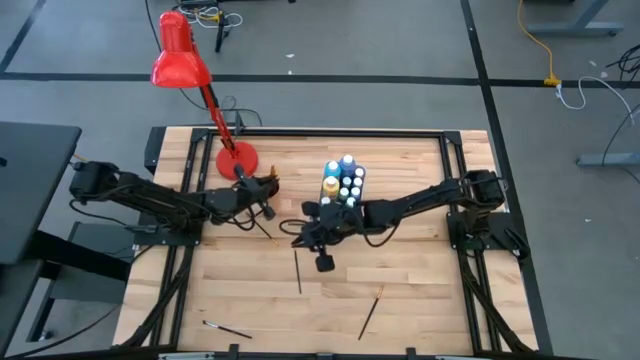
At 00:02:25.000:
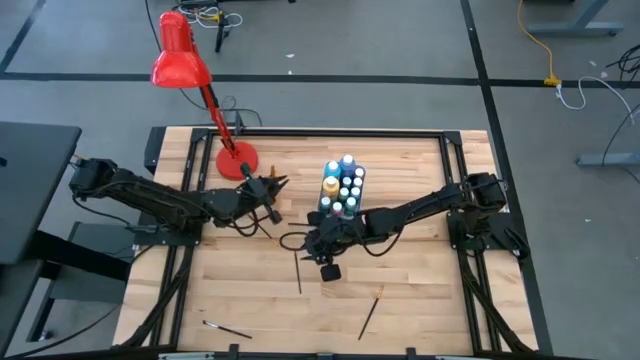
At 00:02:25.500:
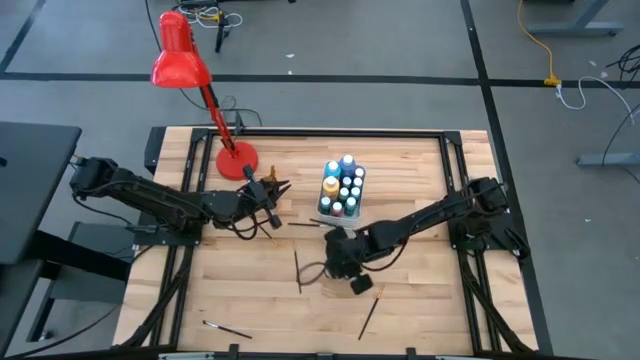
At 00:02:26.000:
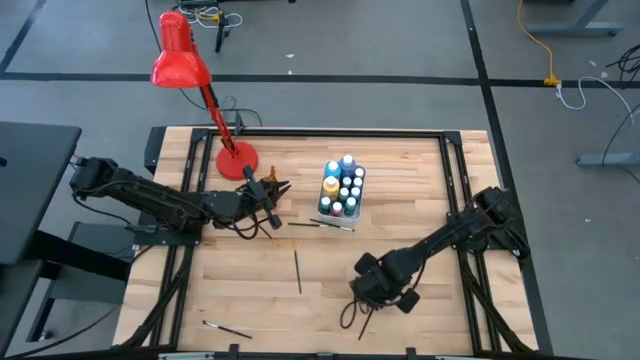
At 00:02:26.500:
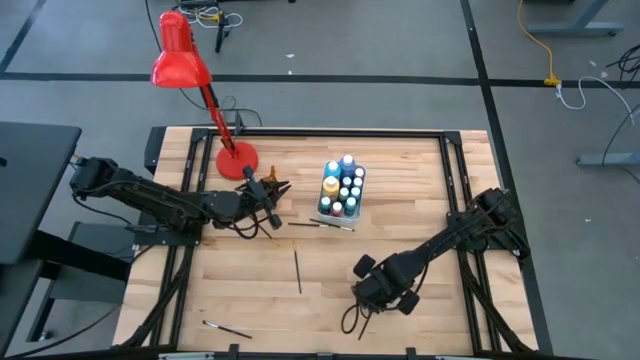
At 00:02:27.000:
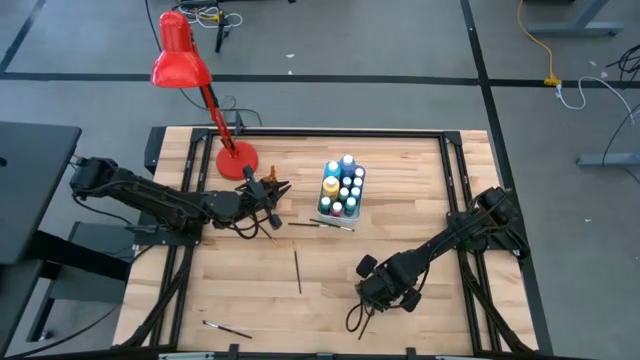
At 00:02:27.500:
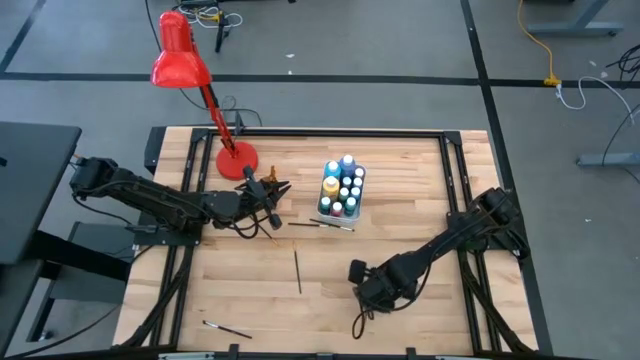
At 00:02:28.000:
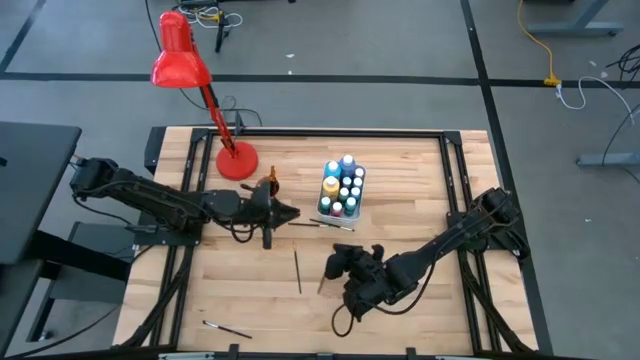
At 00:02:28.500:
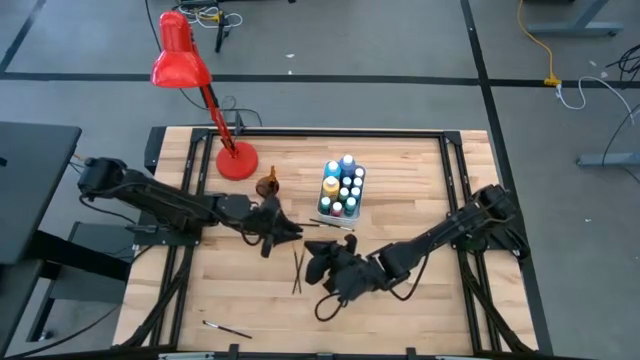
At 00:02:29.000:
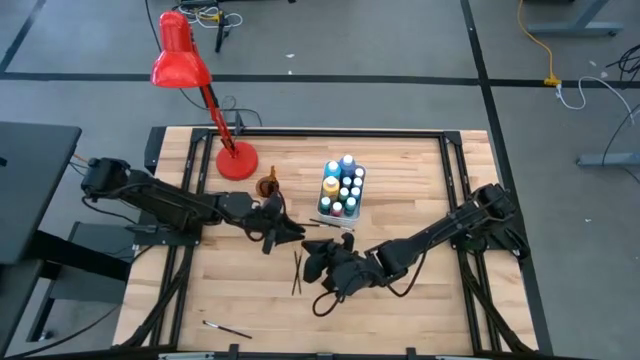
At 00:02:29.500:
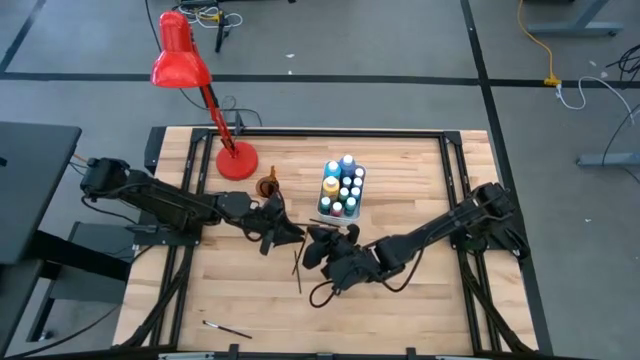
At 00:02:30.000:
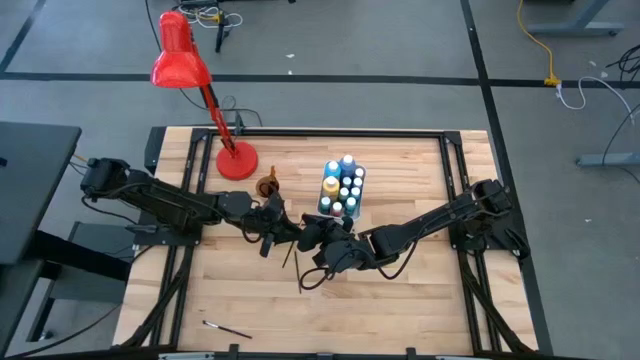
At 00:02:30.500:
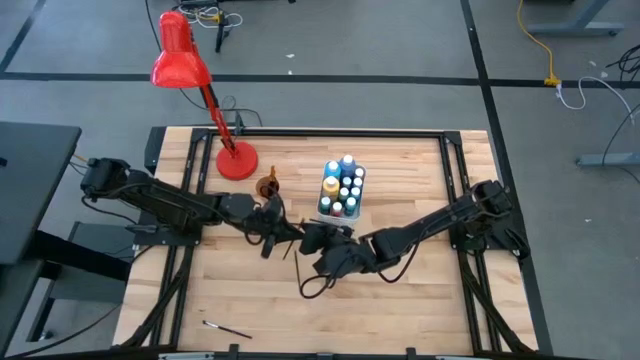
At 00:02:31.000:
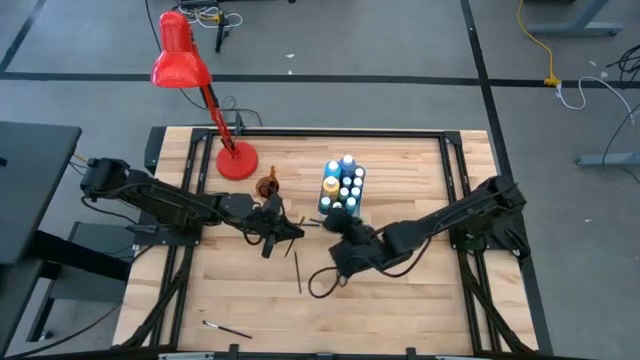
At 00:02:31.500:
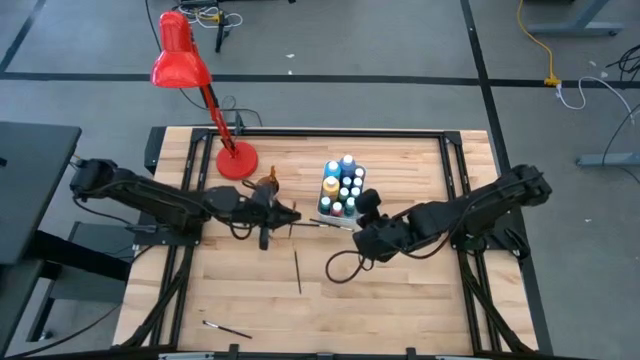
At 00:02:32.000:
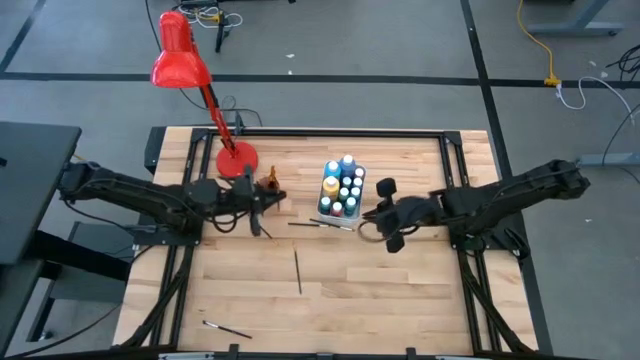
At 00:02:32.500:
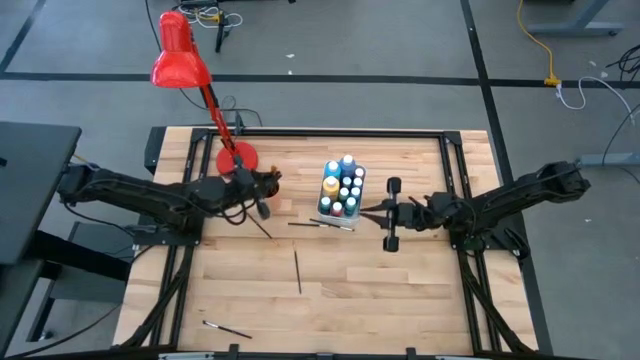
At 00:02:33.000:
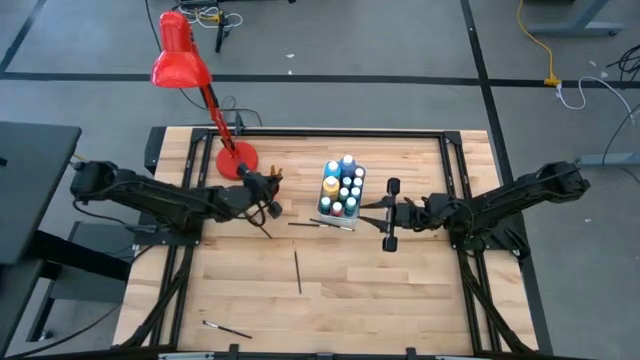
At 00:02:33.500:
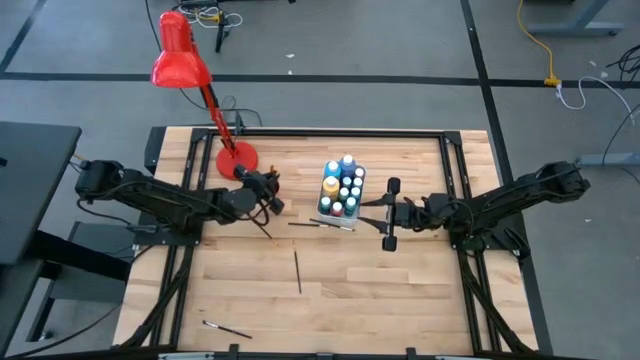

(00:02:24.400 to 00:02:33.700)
Task: Pick & Place Paint Supplies
Put the yellow paint brush into the orange cup

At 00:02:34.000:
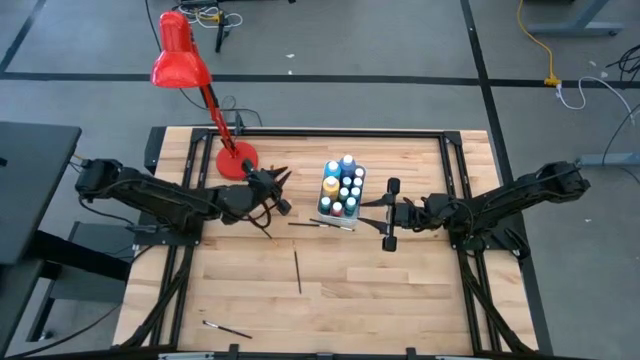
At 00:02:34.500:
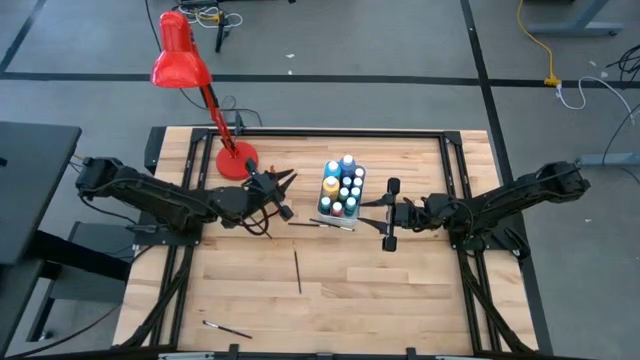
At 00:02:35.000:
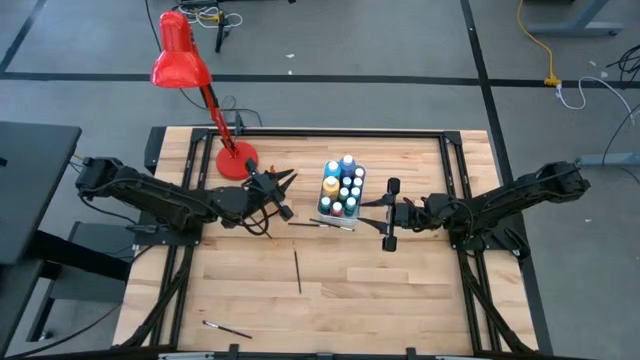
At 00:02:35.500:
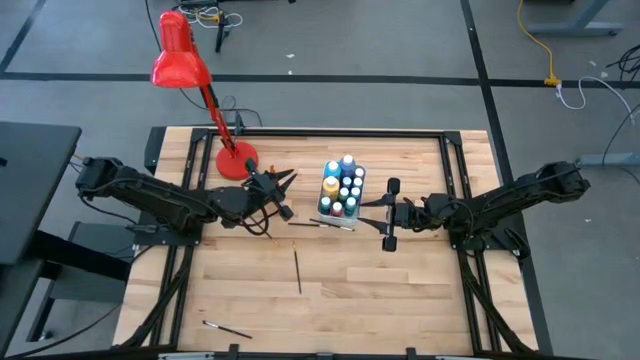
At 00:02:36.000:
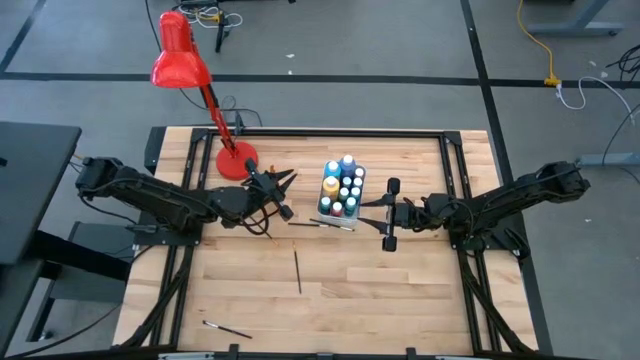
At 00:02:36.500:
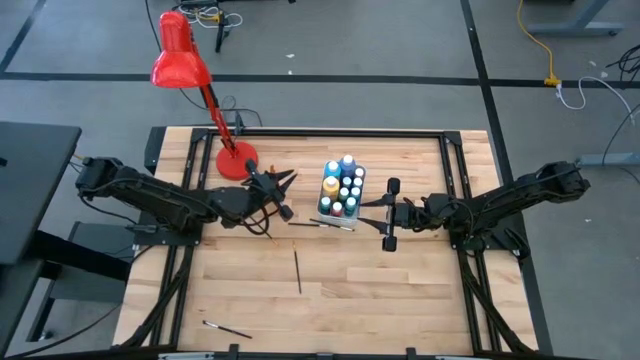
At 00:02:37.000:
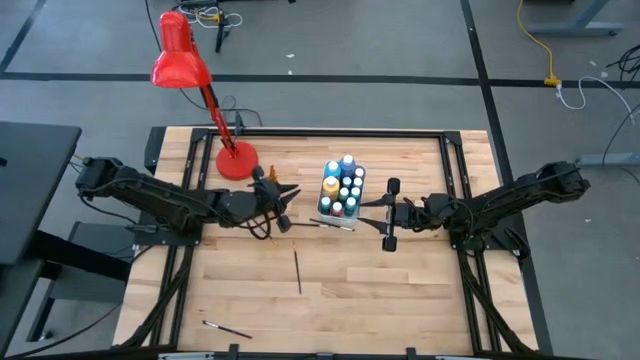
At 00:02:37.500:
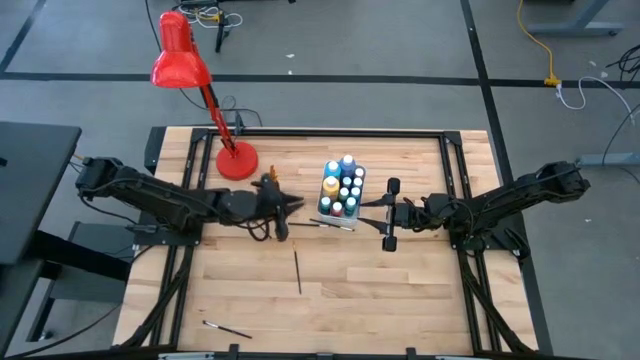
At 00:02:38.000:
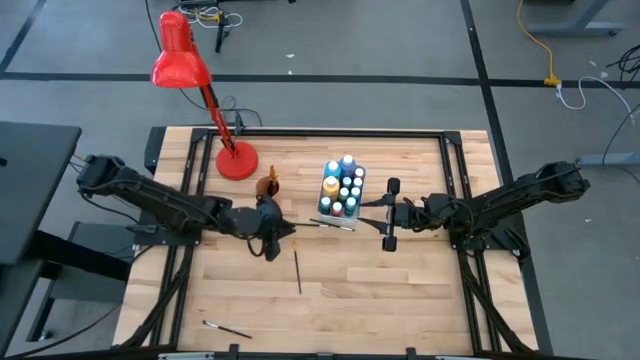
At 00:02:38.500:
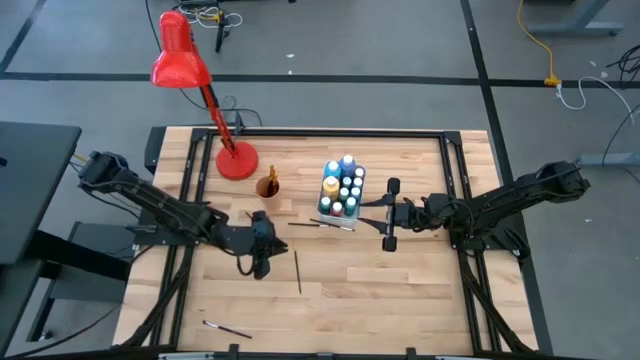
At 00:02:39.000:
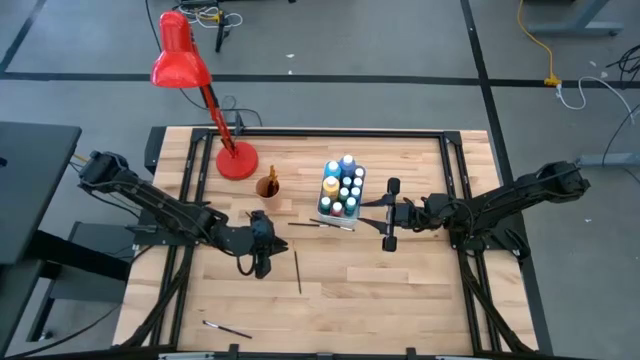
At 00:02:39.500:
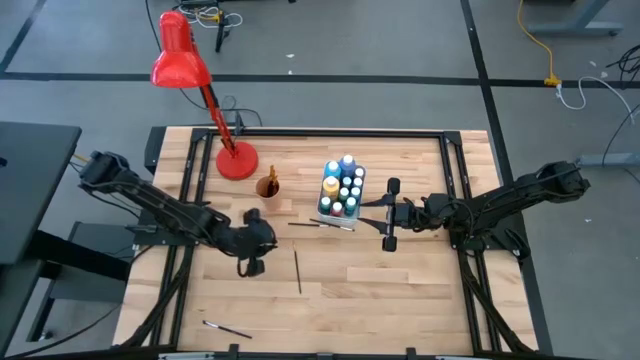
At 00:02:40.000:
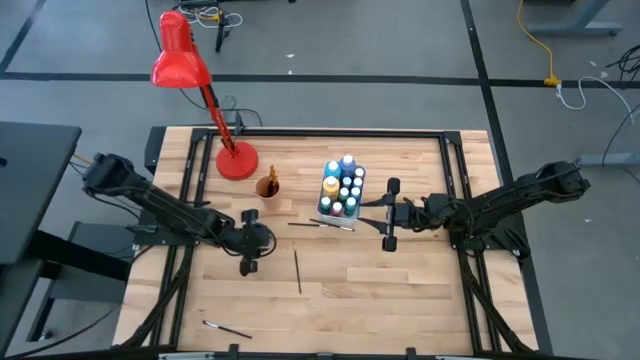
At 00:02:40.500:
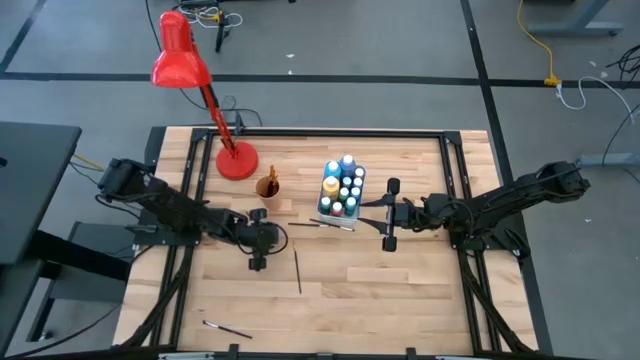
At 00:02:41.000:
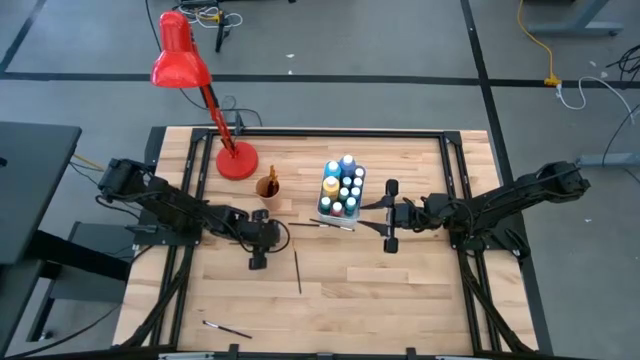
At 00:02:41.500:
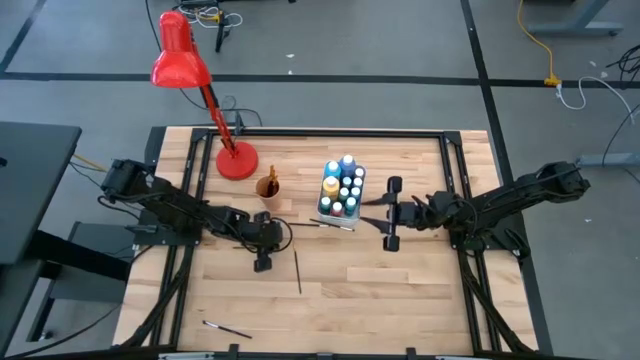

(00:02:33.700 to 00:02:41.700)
Put the yellow paint brush into the orange cup

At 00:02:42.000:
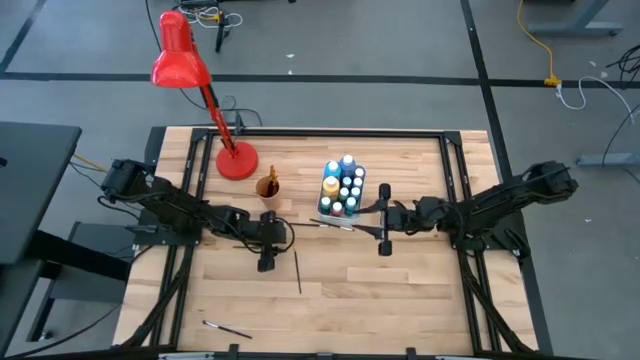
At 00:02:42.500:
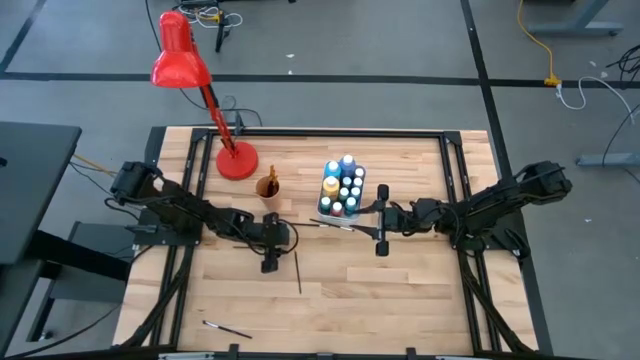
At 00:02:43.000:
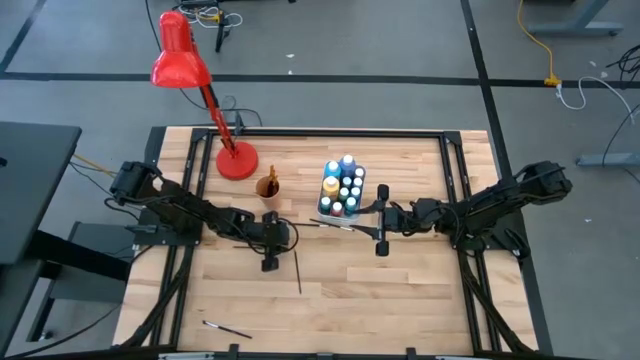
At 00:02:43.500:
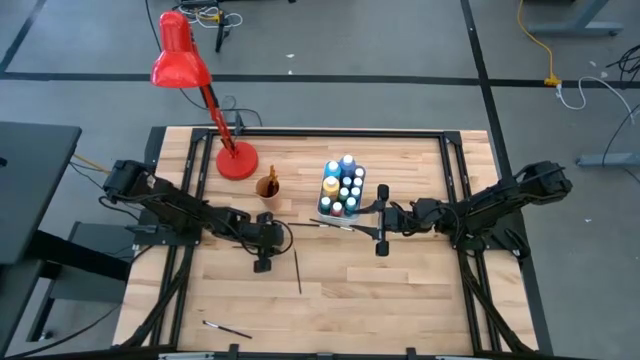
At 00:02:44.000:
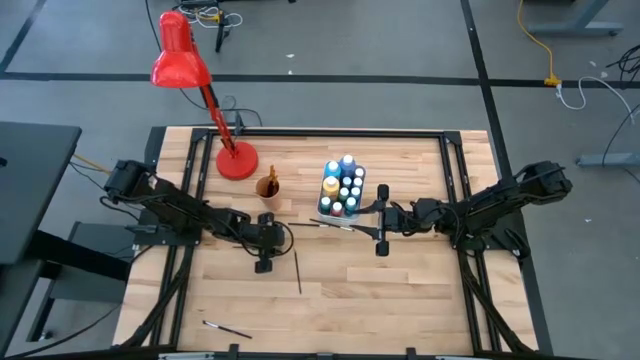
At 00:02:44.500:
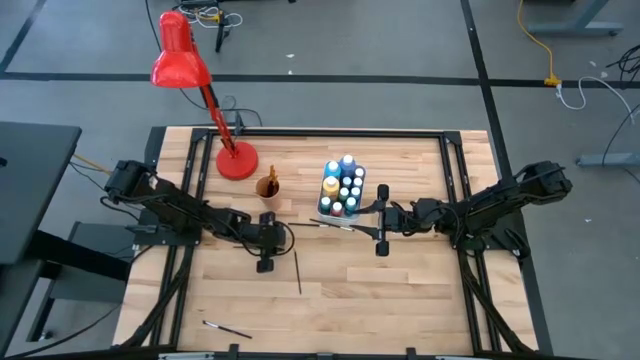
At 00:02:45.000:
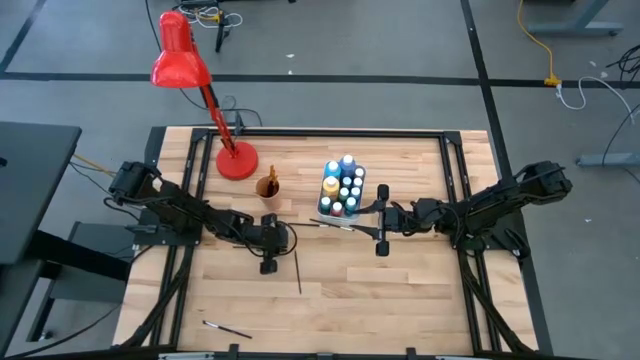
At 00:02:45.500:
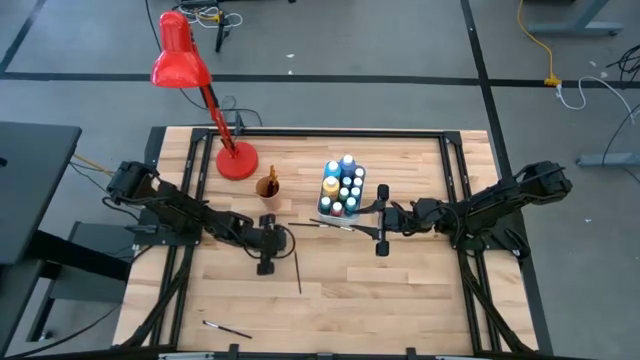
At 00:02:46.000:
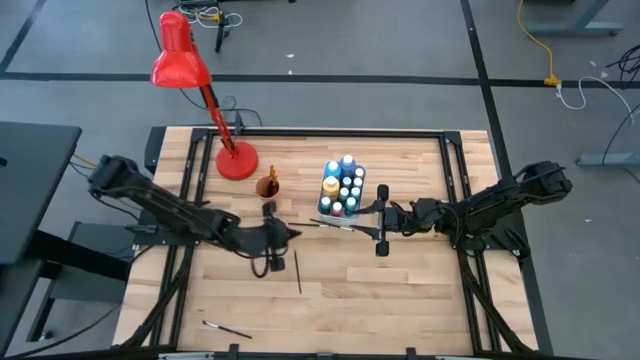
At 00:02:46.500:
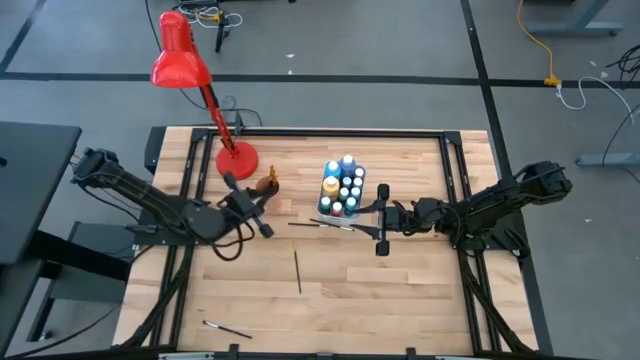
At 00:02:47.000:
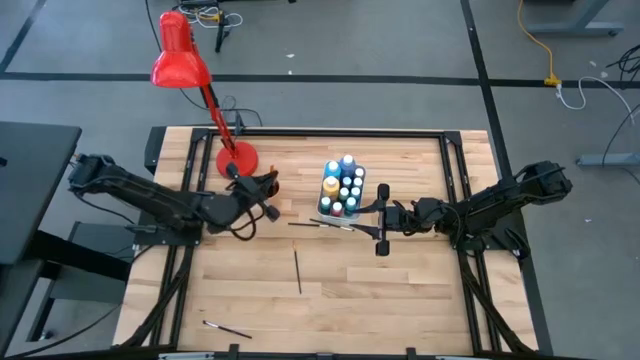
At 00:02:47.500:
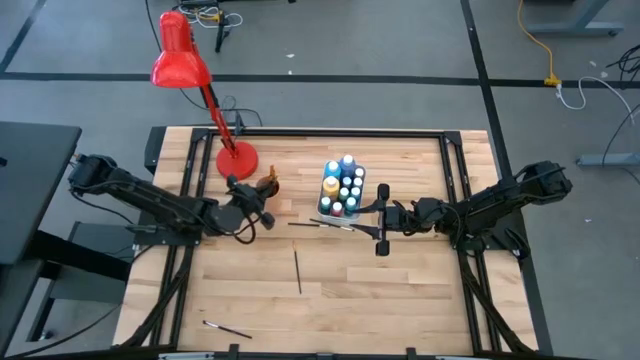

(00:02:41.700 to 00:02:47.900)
Put the yellow paint brush into the orange cup
